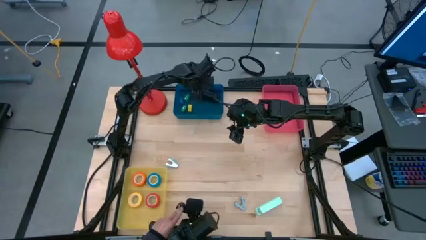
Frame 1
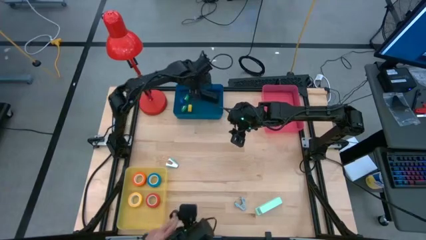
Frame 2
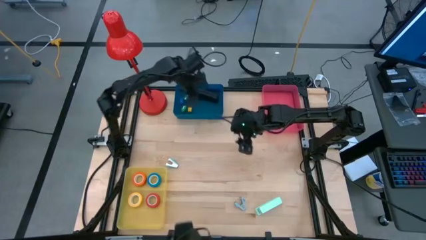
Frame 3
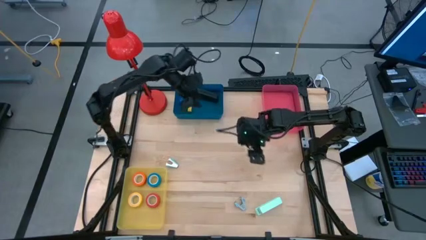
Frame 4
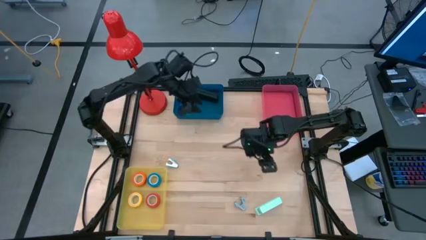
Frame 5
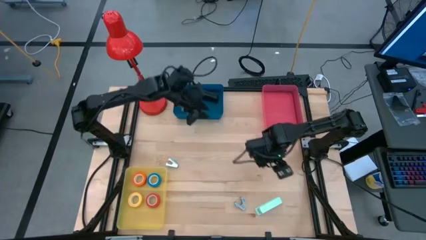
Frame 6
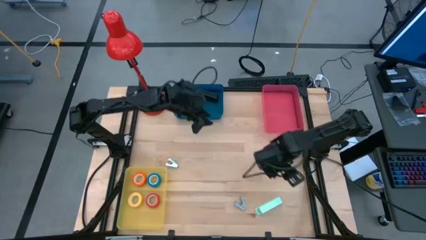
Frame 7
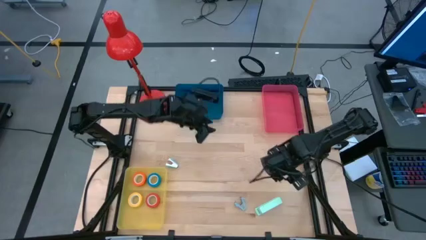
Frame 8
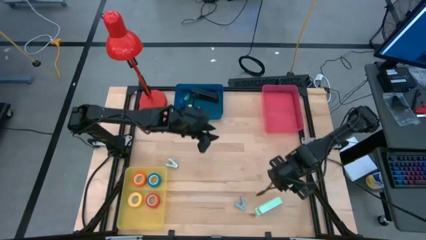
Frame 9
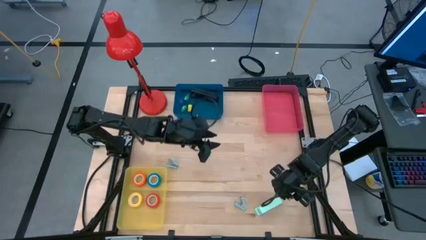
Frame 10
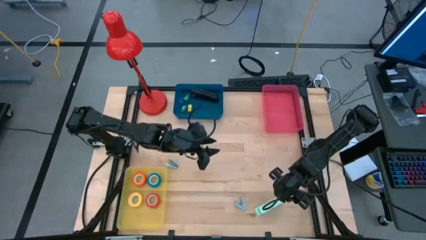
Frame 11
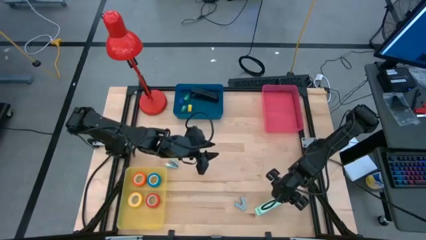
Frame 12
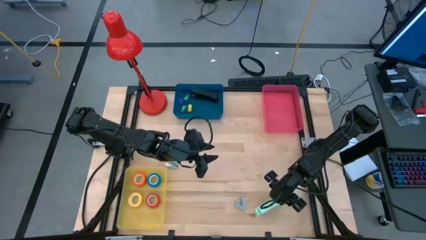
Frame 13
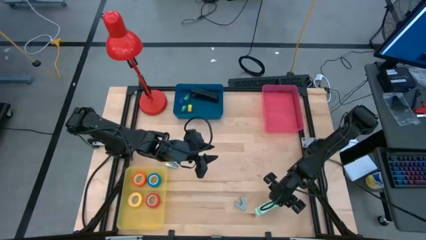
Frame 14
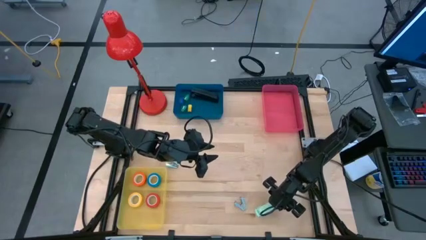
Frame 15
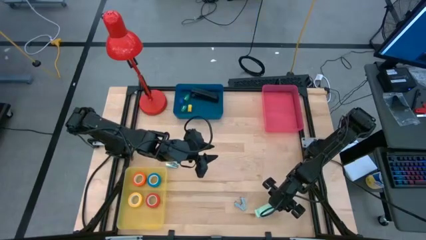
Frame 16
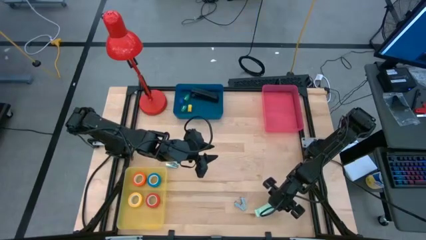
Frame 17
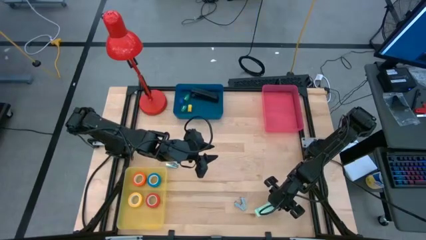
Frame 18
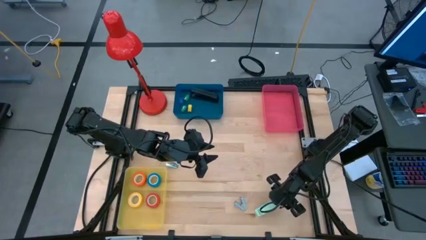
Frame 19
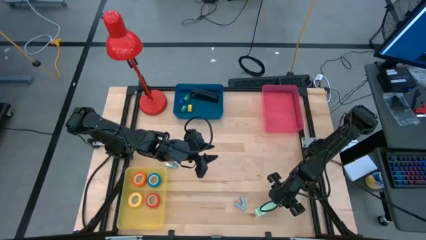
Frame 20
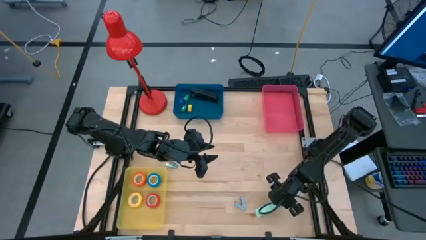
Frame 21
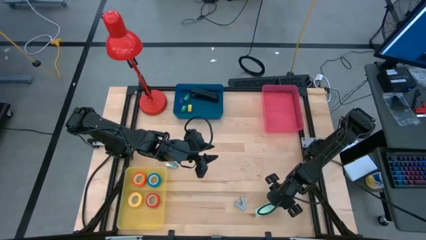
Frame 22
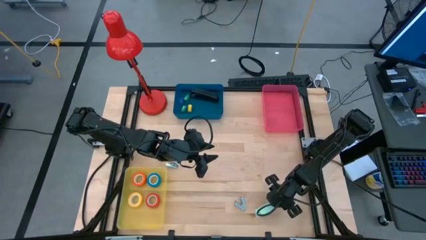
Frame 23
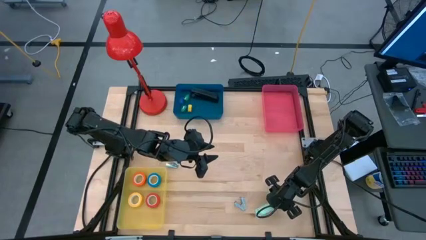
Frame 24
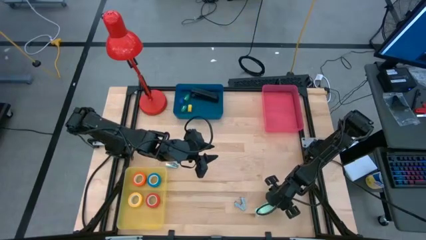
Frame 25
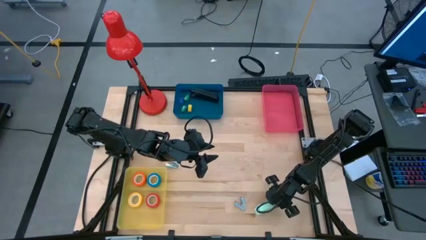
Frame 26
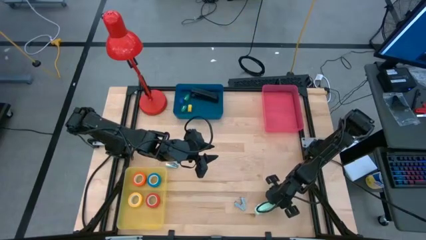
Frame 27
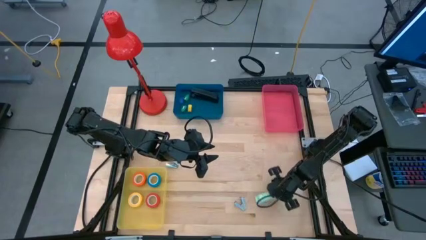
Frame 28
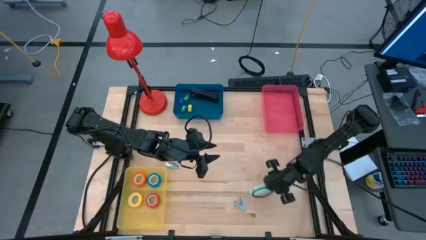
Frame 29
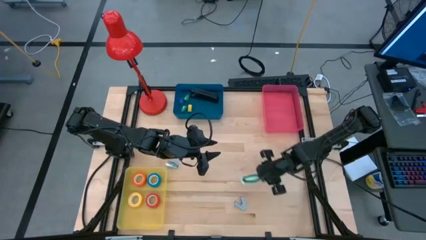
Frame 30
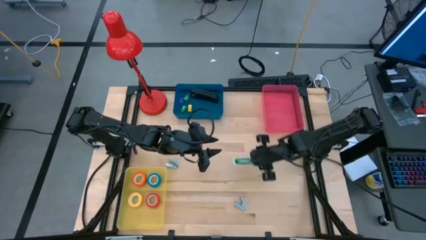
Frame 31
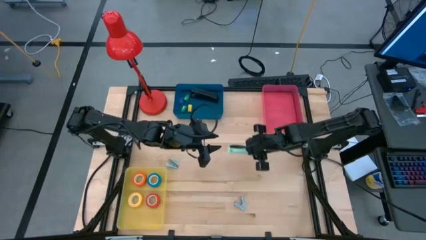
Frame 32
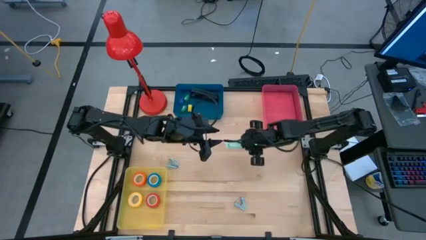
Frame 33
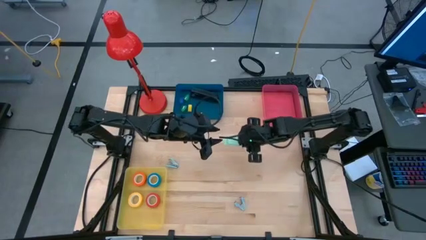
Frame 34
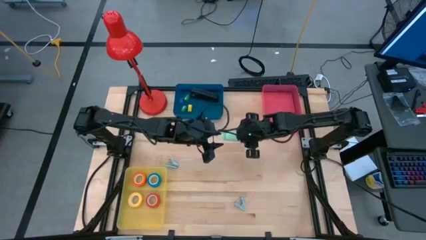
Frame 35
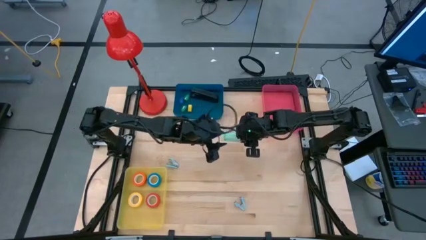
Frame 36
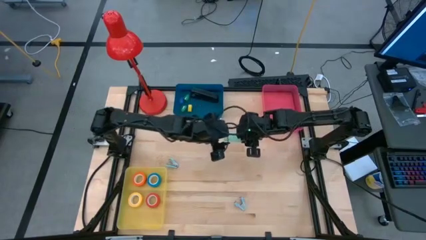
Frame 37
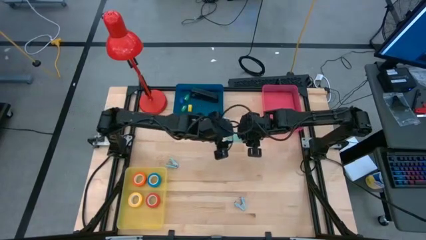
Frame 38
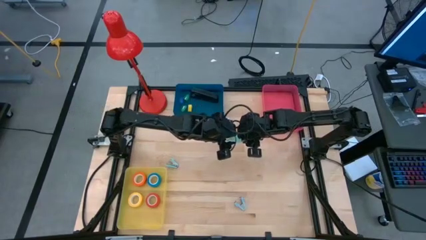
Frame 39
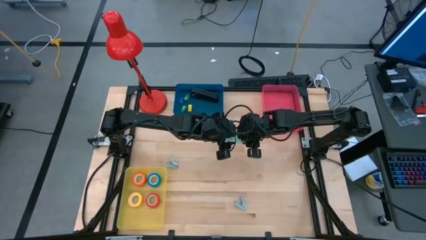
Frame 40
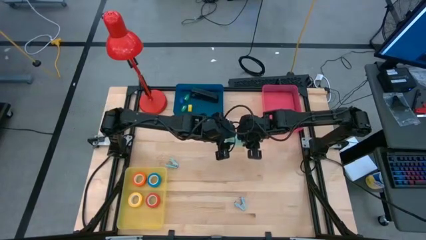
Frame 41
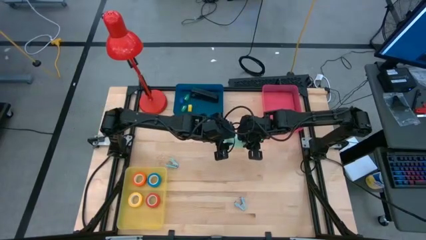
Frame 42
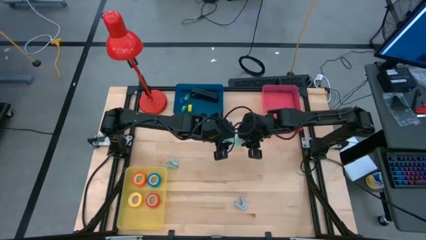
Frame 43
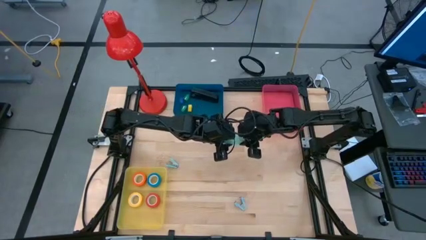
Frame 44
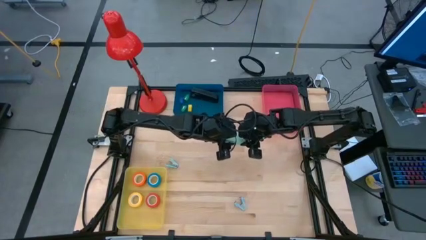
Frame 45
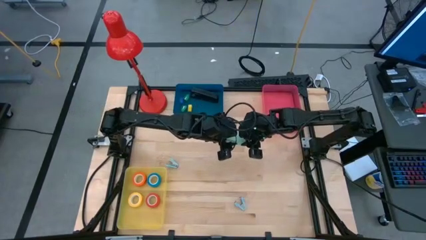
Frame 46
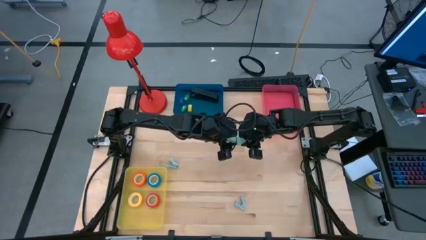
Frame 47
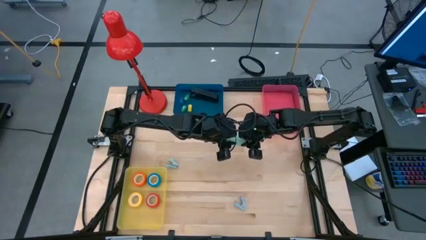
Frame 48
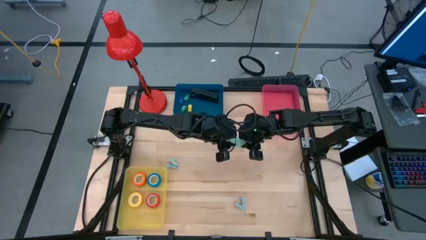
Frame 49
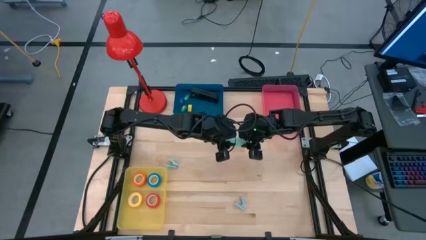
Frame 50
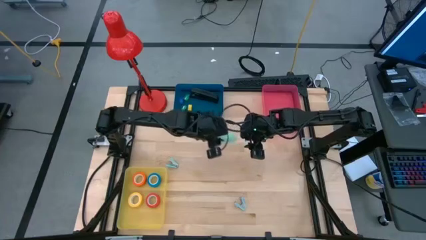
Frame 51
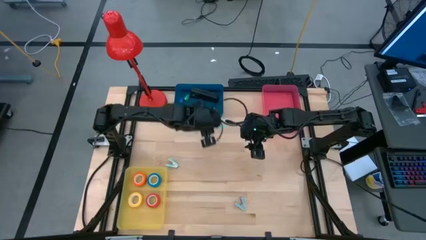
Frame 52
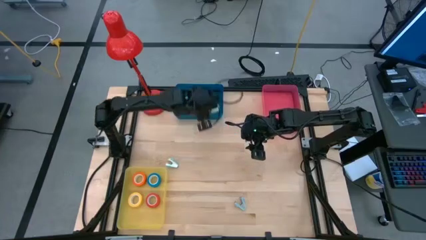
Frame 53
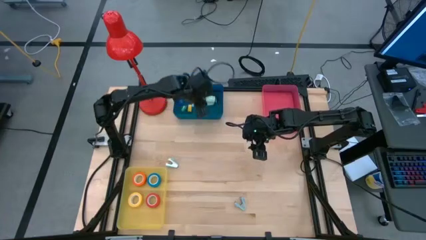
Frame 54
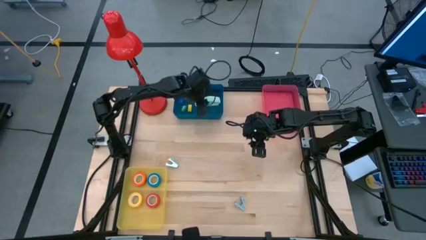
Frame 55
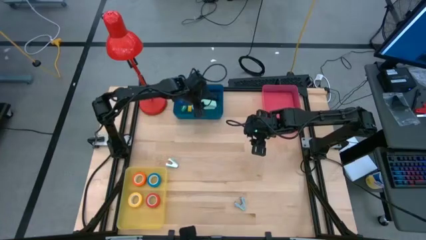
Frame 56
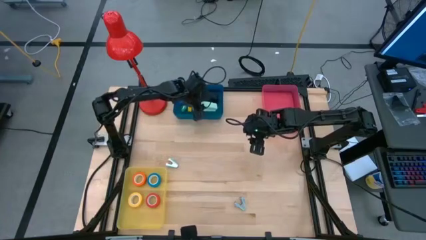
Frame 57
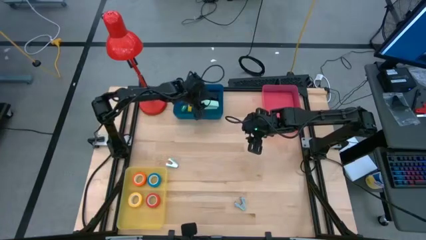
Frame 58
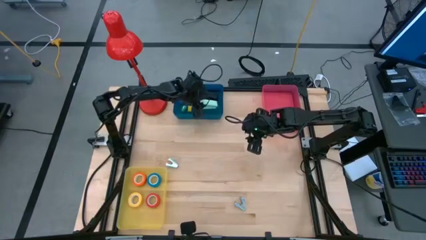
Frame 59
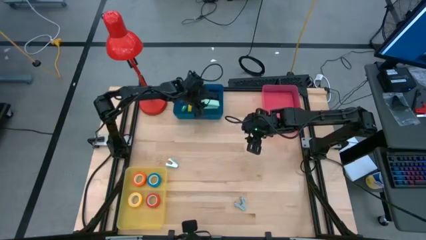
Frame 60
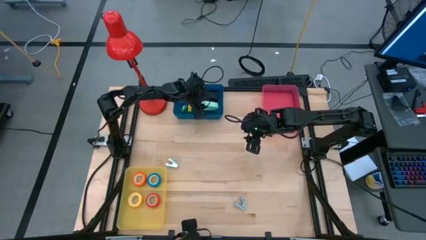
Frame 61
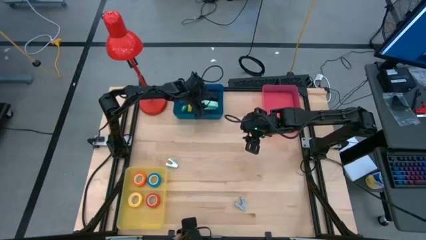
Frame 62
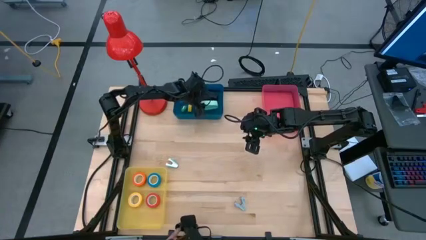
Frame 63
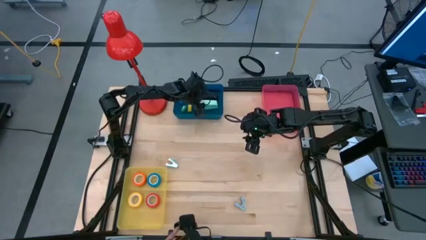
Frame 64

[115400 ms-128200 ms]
Task: Pick and place Stapler, Stapler remover, tape
Put the light blue stapler into the blue bin

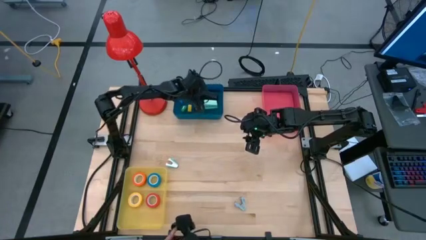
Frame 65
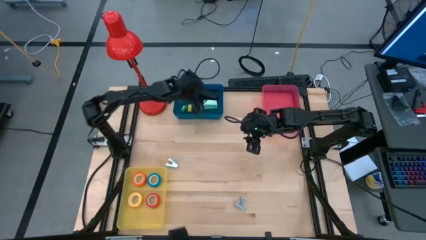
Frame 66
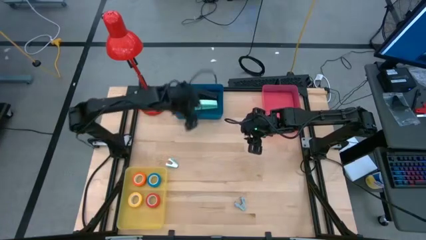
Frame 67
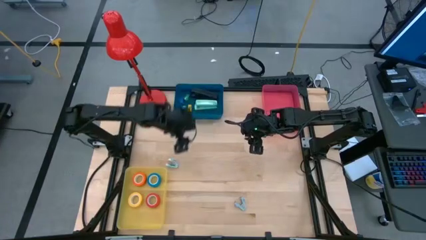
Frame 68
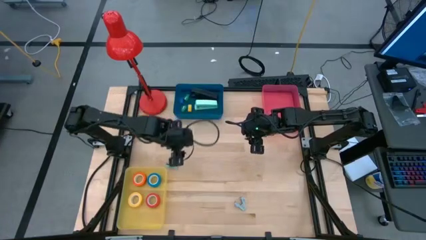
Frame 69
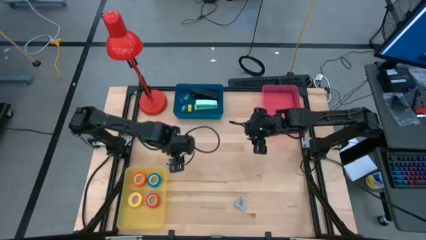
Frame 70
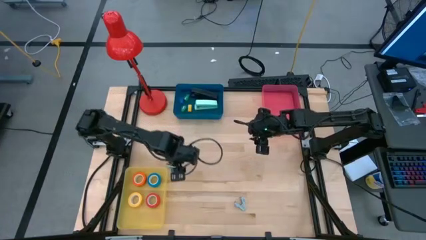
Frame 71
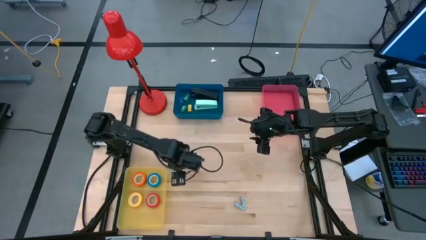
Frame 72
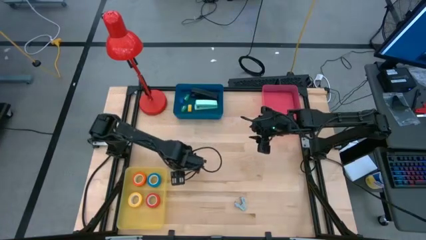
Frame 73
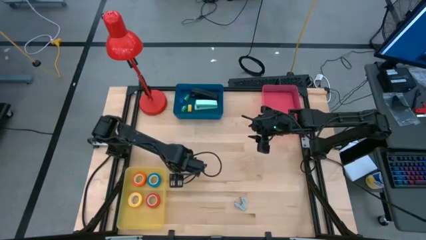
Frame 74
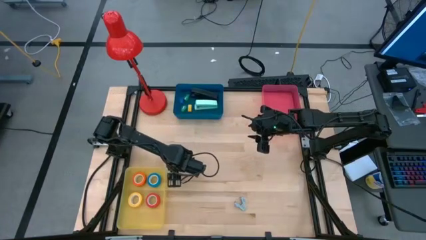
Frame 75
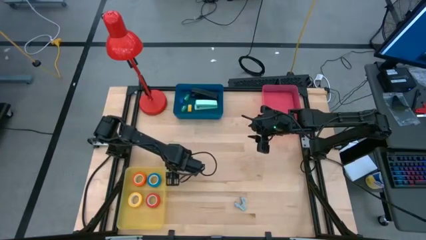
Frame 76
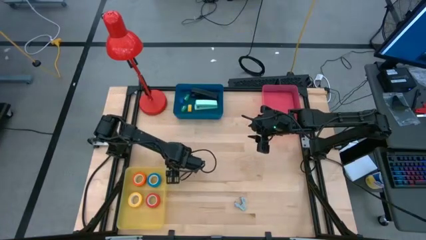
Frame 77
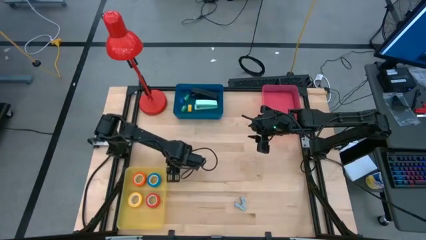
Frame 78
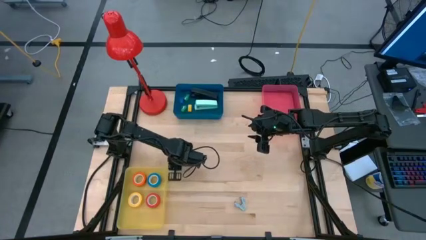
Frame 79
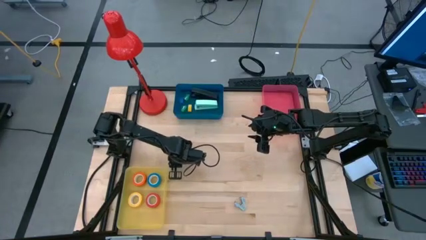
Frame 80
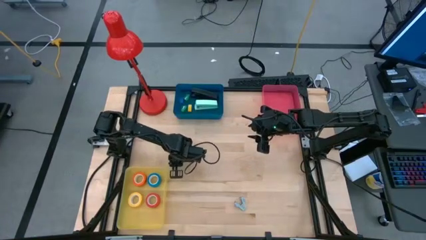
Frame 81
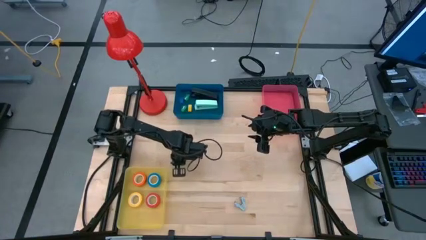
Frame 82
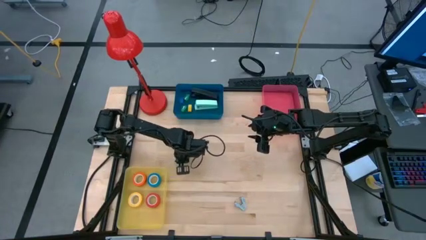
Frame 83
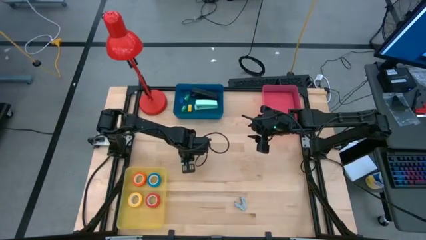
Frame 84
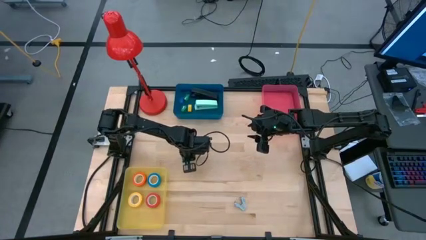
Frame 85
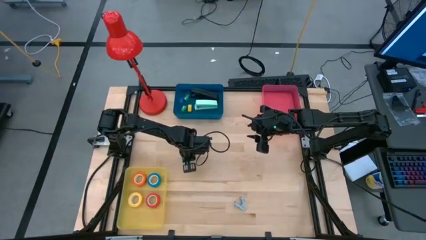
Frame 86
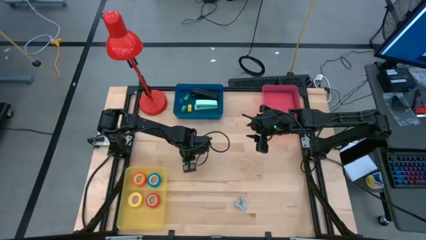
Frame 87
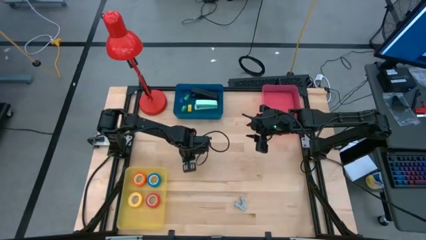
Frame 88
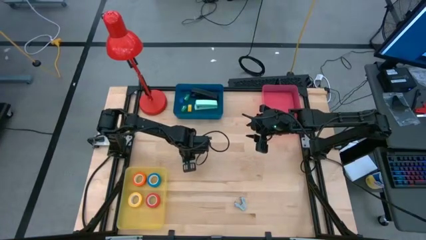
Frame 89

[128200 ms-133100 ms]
Put the light blue staple remover into the pink bin
